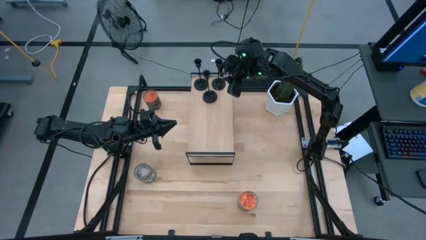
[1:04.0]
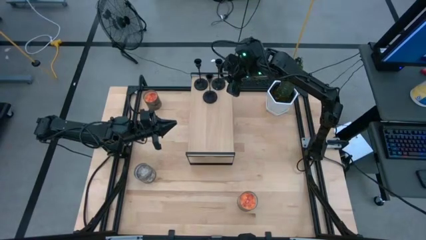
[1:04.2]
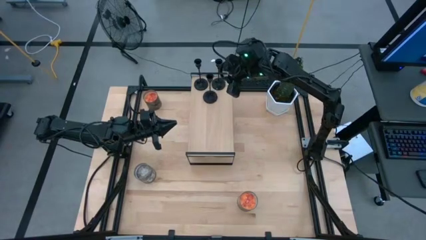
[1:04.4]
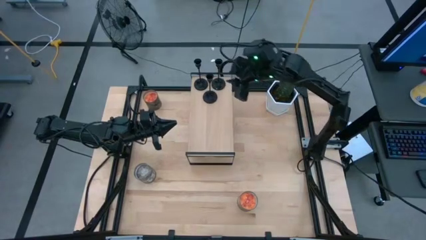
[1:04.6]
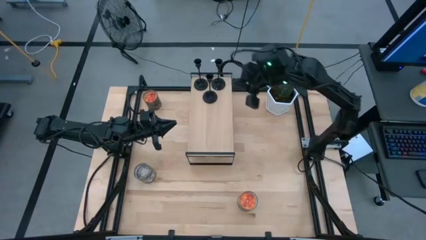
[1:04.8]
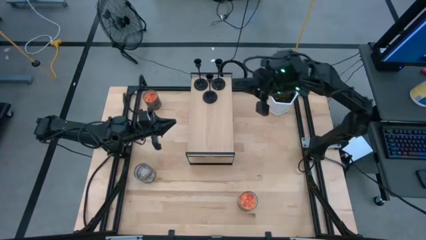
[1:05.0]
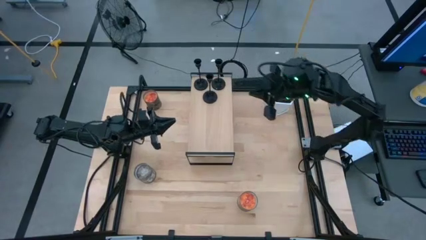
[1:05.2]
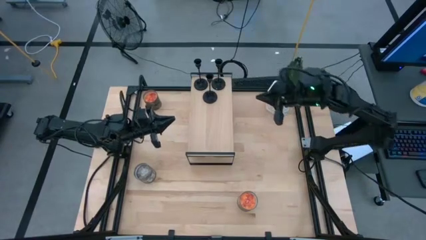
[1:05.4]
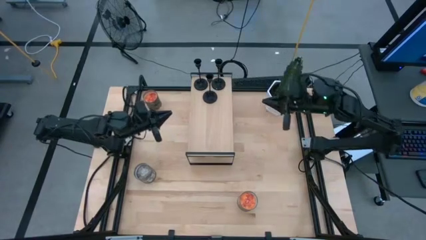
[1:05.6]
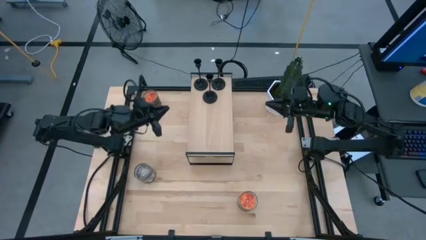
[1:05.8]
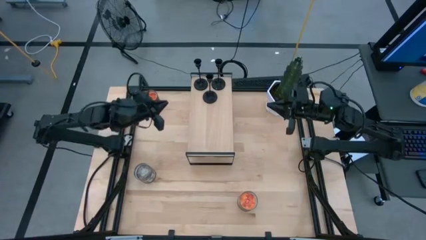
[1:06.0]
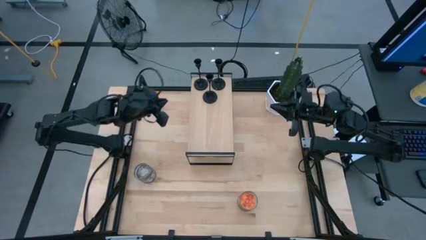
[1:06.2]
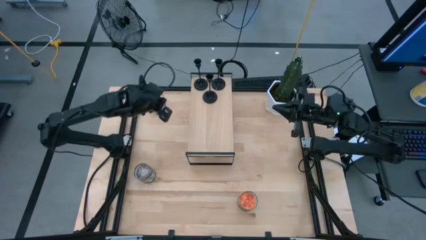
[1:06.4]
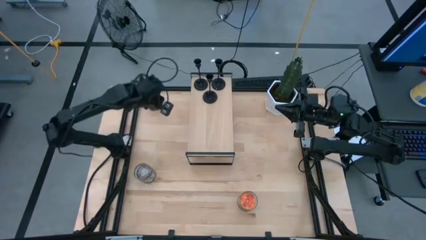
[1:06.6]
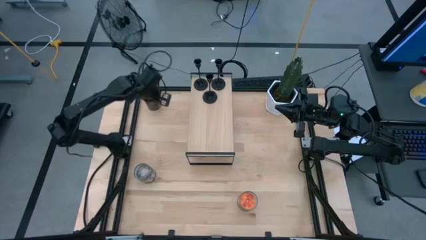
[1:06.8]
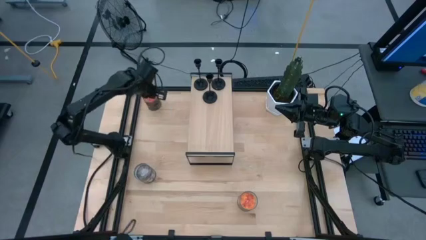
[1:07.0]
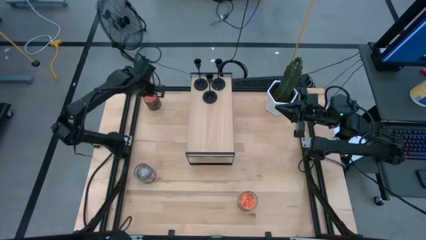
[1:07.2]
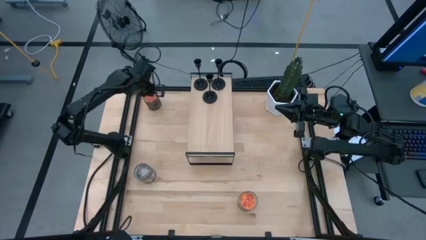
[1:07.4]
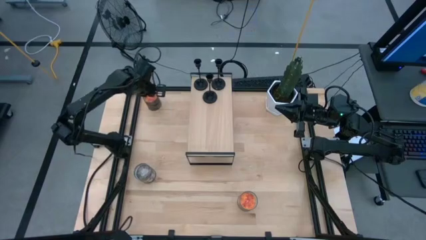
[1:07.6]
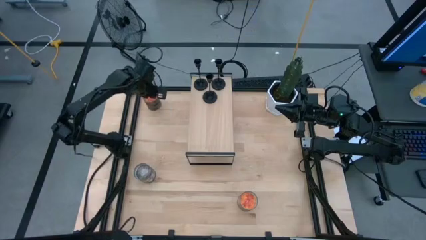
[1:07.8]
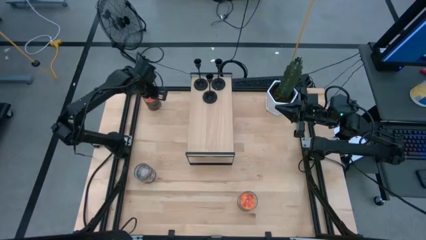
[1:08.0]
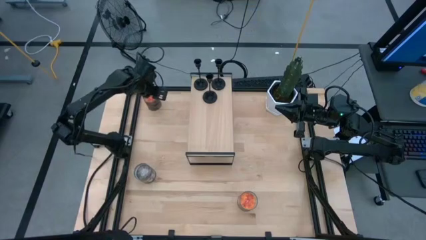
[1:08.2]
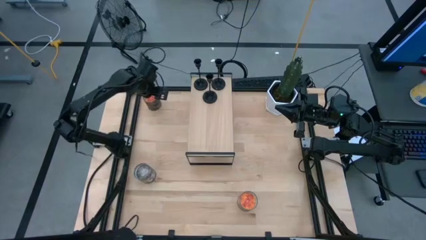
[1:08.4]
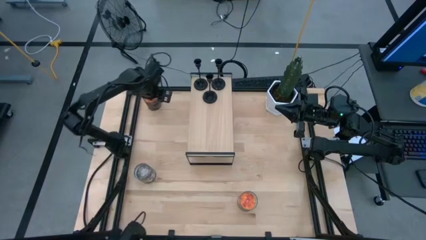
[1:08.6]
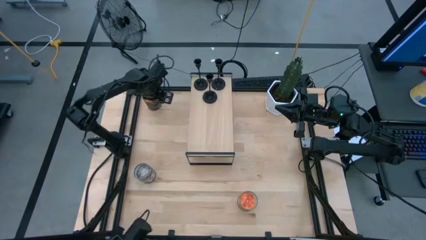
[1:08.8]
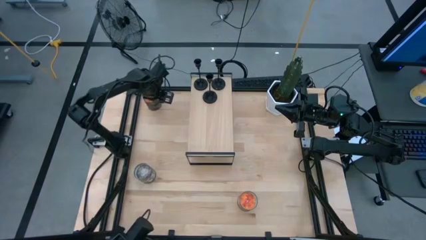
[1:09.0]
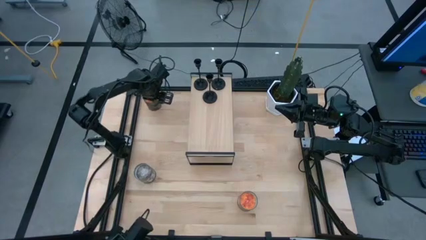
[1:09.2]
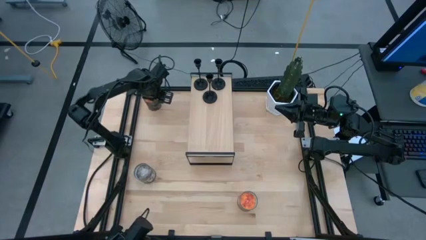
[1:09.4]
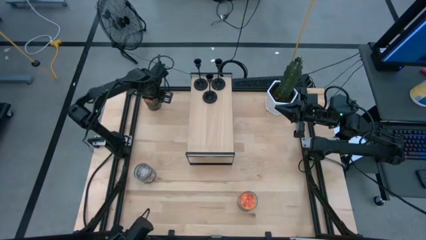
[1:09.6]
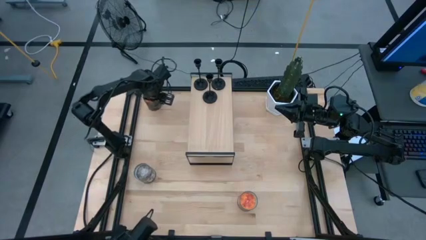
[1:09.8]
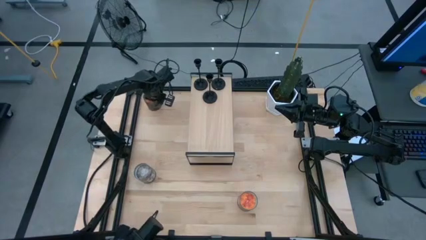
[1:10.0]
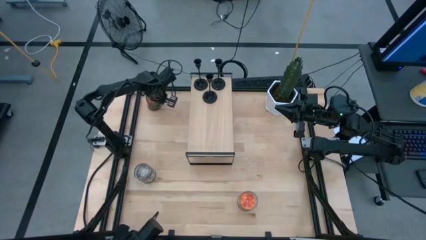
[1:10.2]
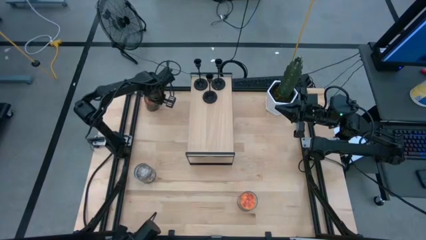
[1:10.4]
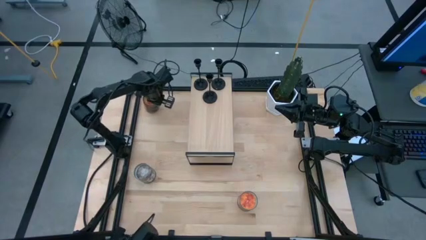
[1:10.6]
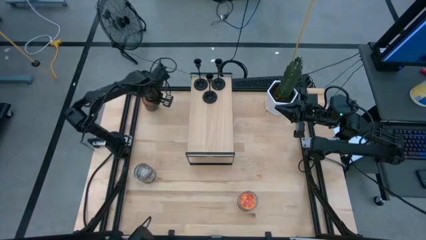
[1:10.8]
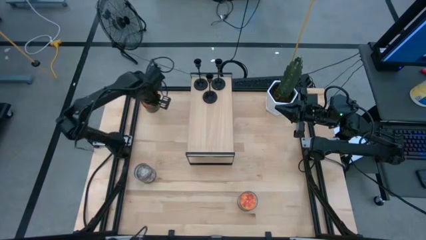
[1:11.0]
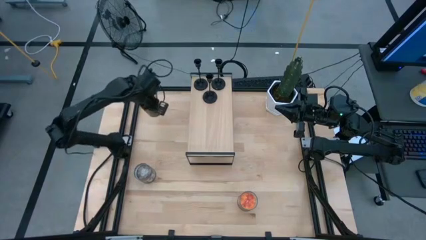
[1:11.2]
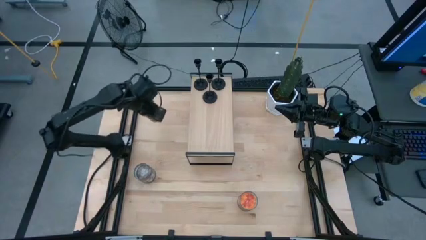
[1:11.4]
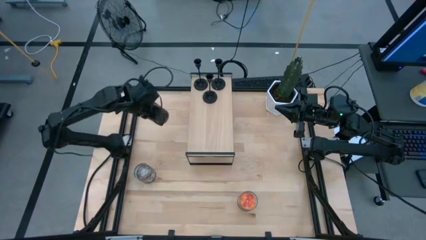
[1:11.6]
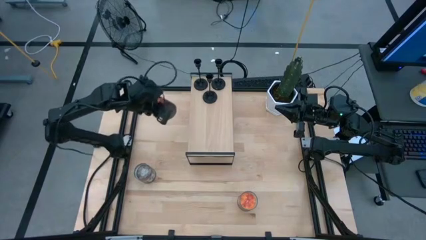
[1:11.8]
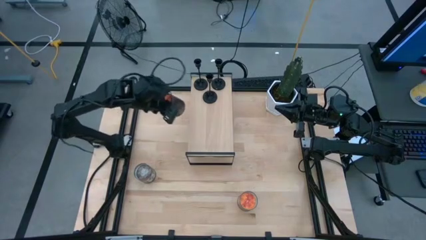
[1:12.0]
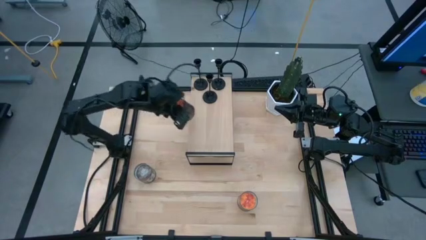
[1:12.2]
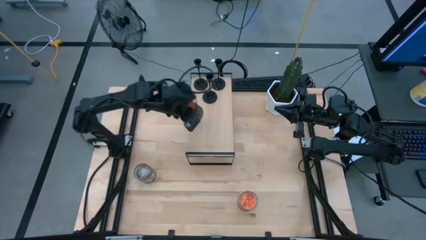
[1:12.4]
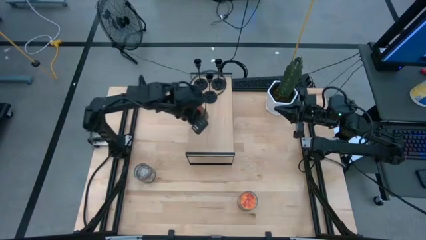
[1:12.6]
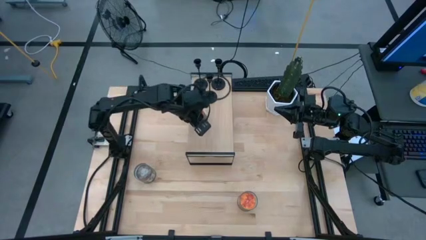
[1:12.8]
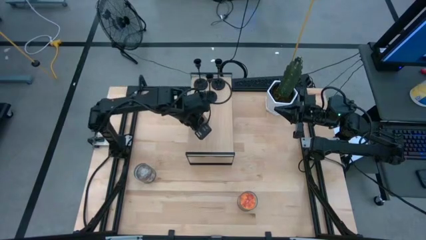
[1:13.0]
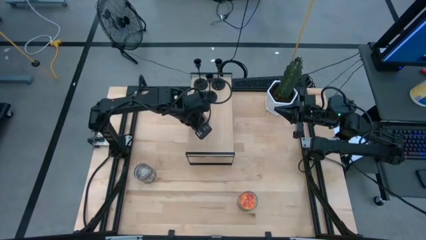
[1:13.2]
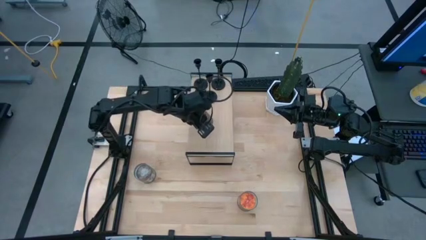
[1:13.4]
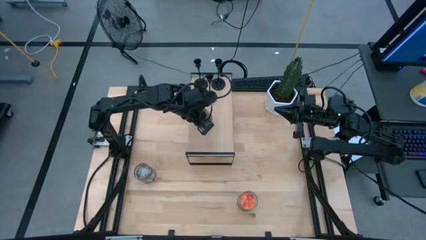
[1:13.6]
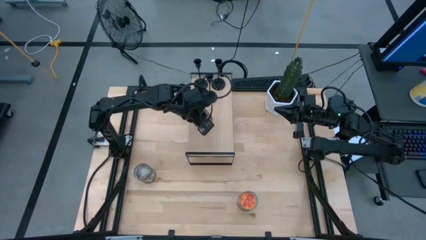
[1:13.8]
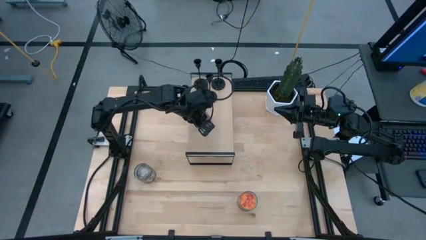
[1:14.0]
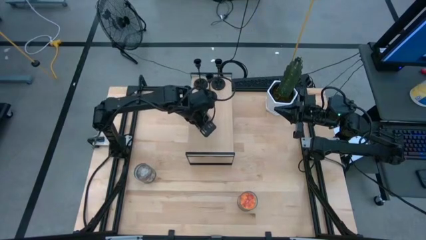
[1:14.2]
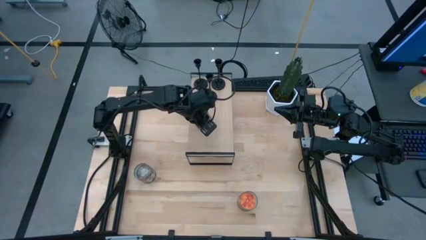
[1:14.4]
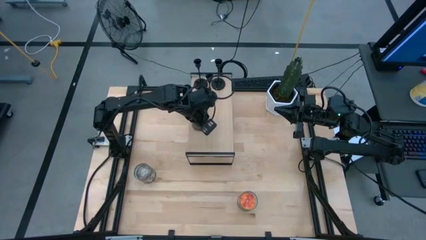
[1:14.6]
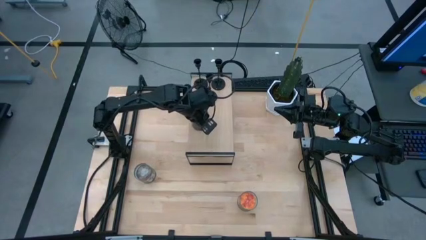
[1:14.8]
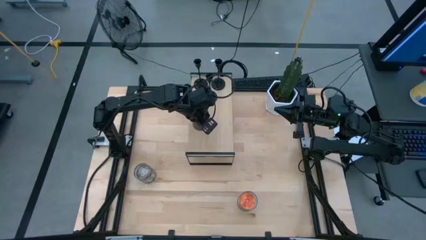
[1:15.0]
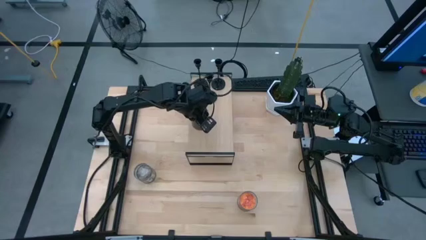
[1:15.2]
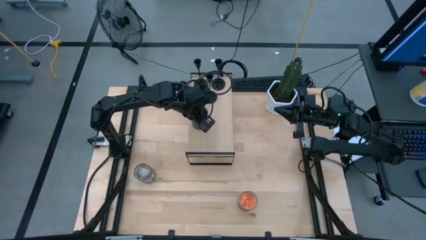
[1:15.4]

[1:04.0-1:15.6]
Task: Pick & Place candle stick holders
Put the top orange scented candle on the shelf

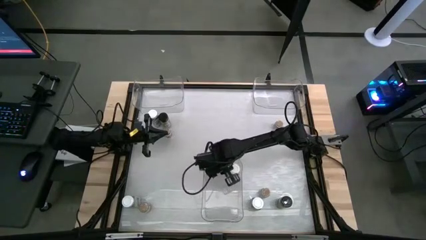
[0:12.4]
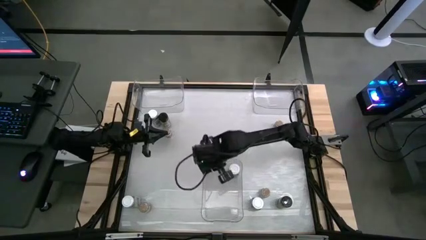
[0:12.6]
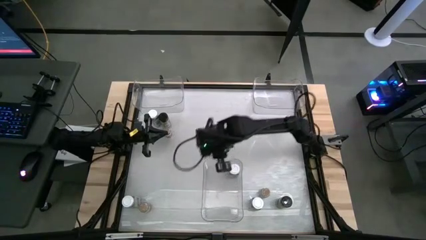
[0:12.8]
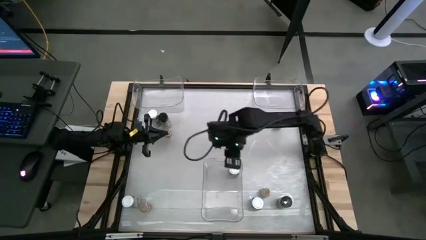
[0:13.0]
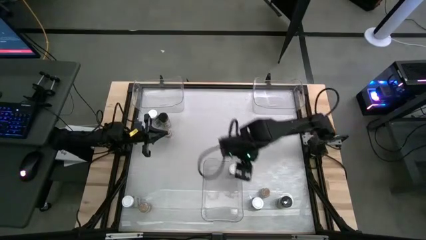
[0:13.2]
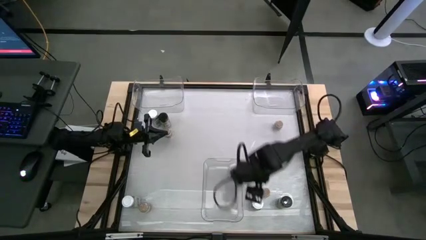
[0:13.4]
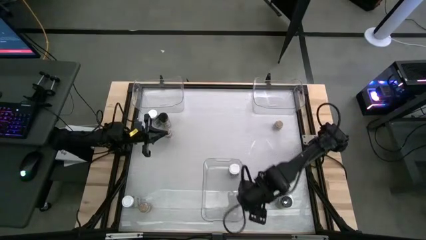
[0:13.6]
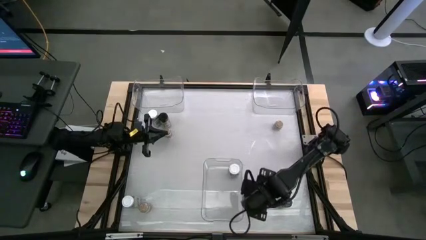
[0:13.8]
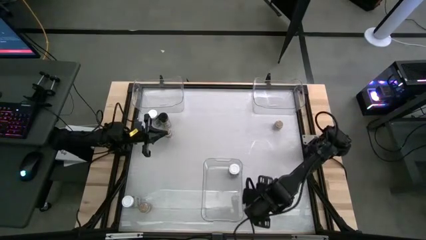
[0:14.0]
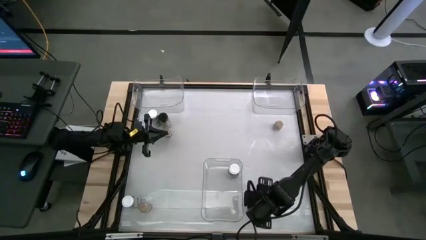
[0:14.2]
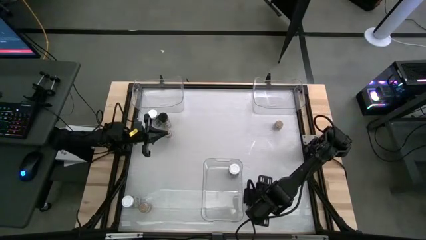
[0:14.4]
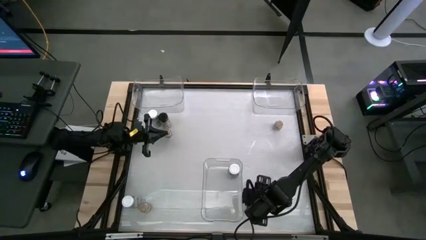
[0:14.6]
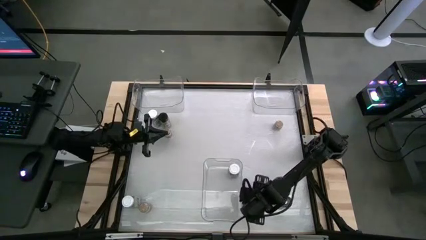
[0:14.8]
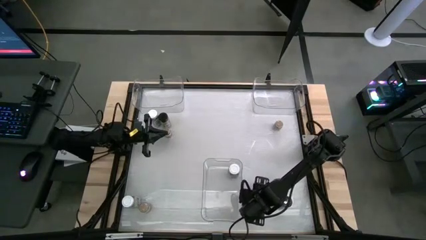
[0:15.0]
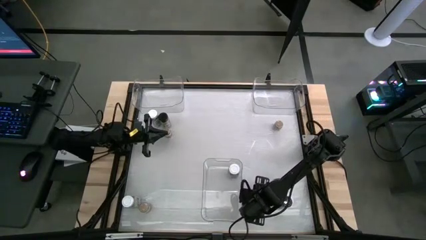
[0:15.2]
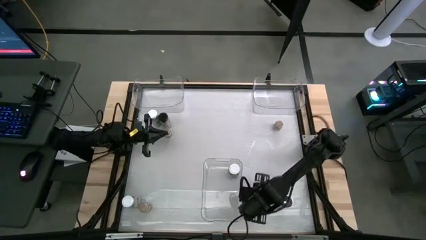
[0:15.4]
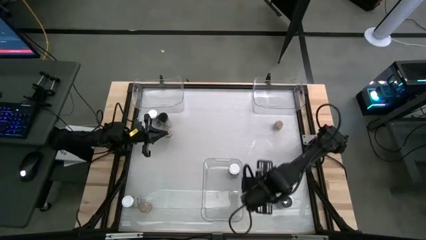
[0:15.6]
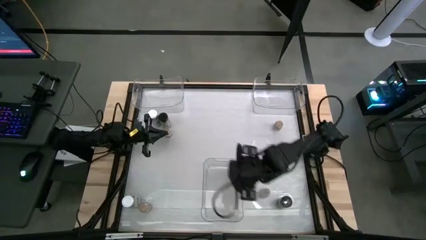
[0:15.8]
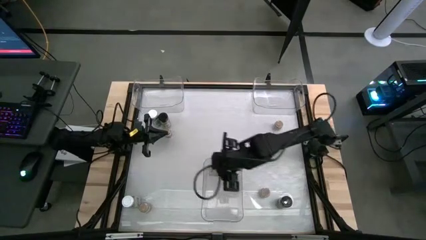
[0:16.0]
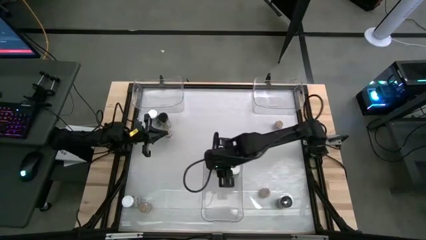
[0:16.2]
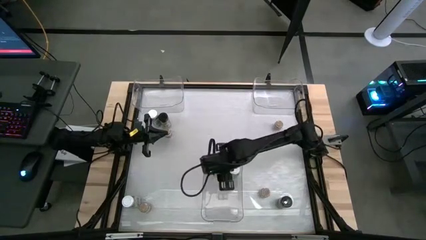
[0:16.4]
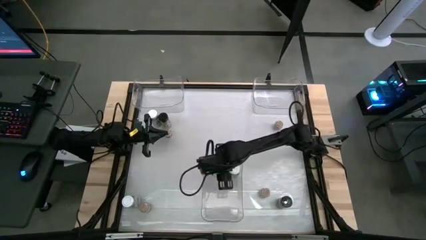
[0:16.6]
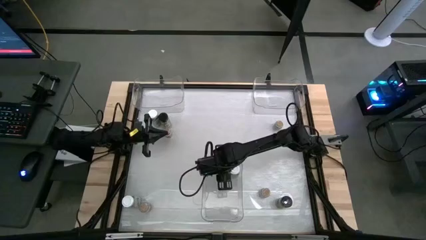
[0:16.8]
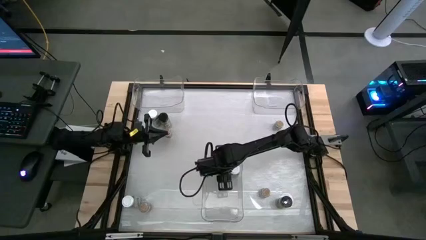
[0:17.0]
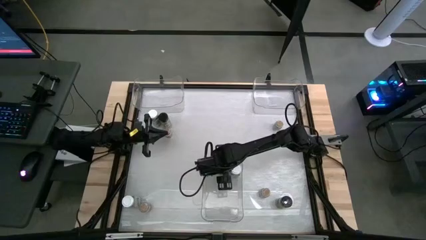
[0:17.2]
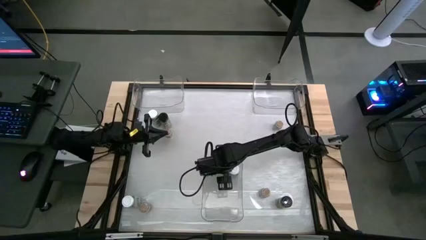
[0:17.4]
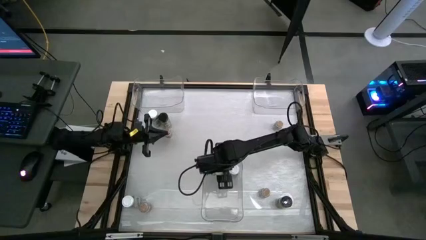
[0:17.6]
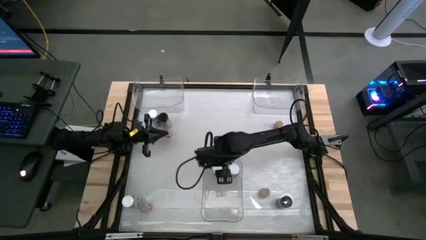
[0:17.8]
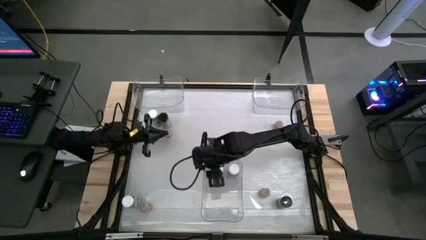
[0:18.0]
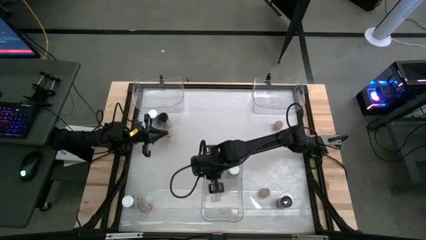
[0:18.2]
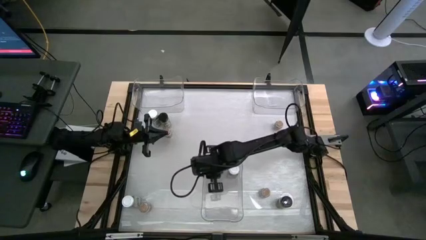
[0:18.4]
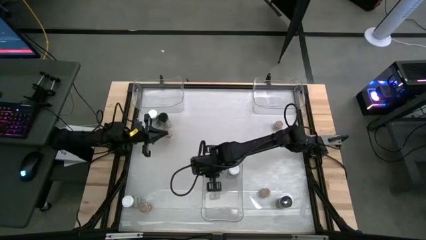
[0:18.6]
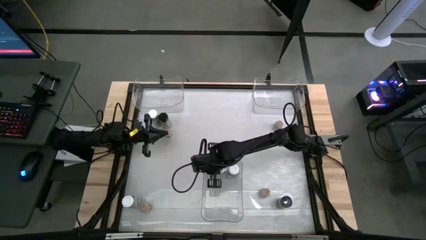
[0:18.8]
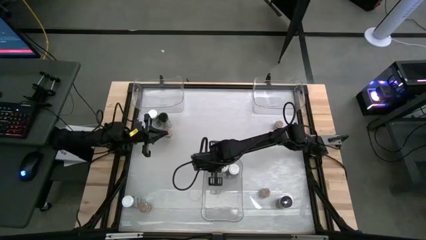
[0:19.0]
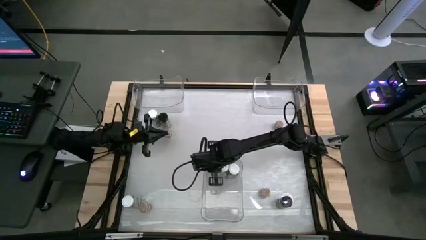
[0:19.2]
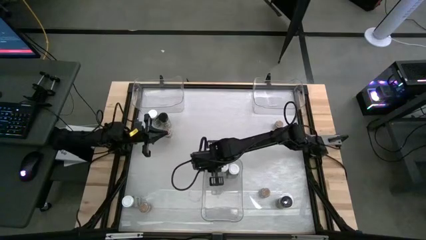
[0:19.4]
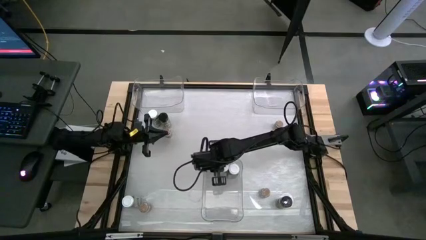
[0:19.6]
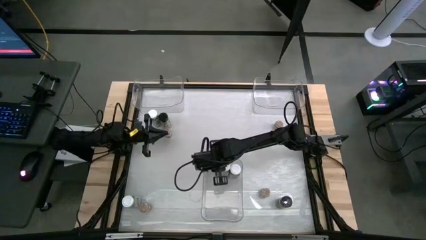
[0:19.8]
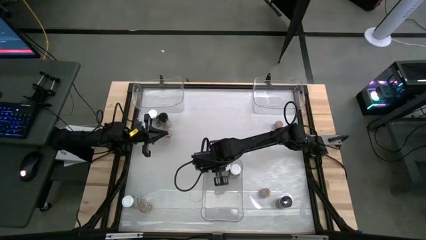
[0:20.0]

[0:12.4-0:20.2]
Task: Sort spices by type
Put the bottom right white seasoning bottle into the bottom transparent bin
